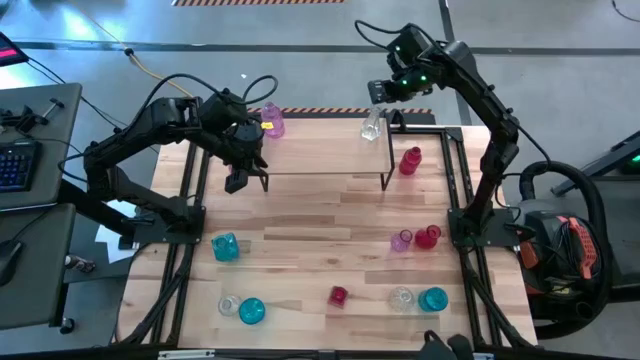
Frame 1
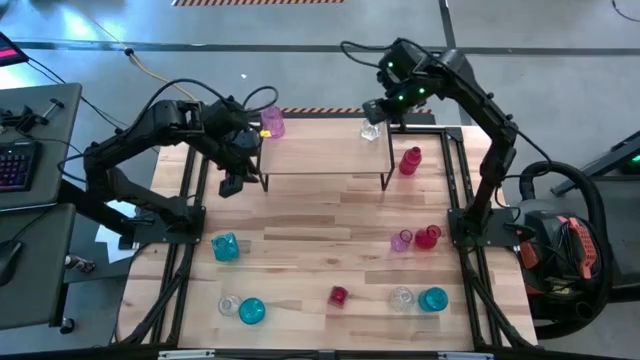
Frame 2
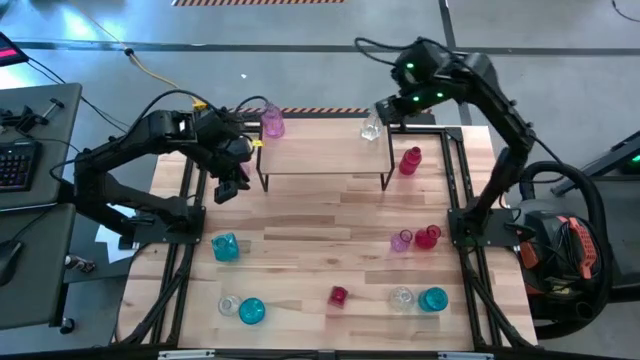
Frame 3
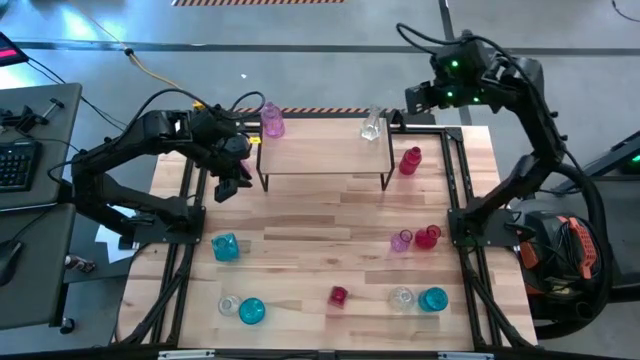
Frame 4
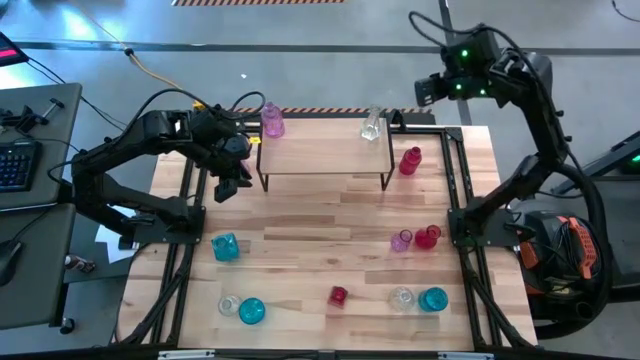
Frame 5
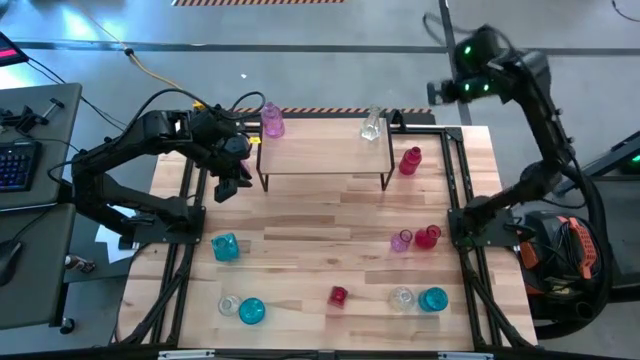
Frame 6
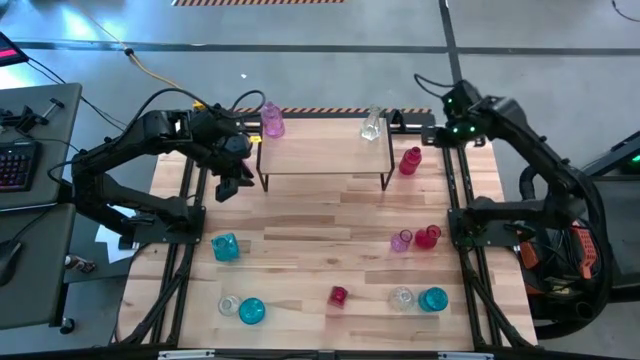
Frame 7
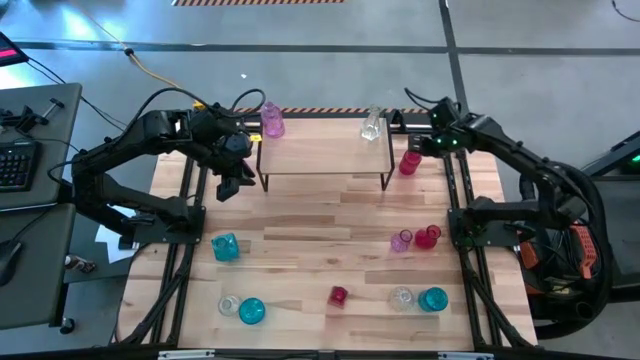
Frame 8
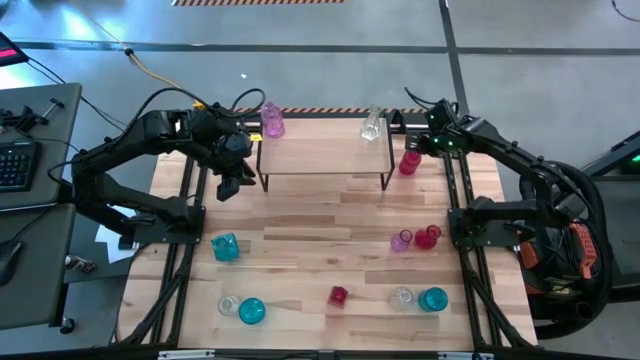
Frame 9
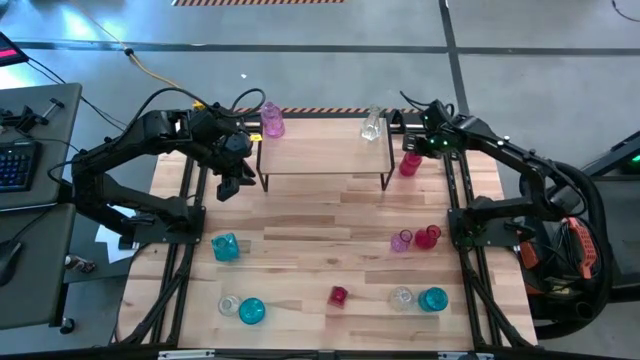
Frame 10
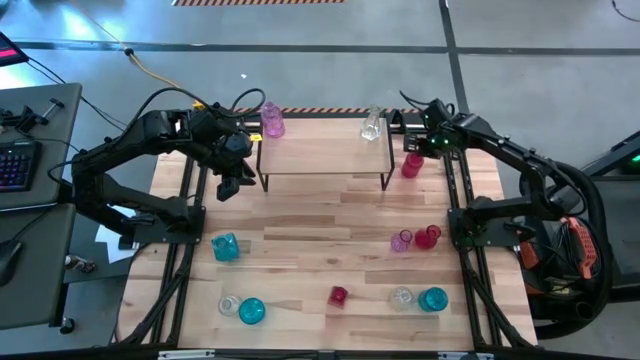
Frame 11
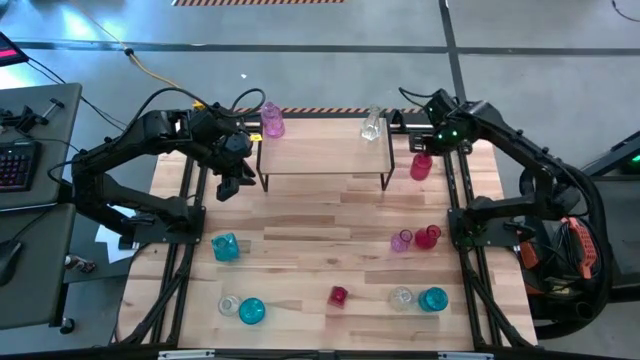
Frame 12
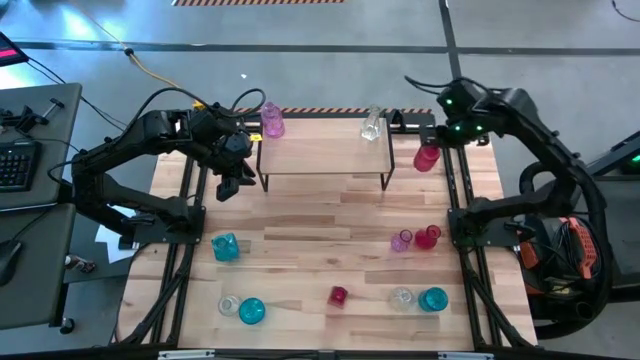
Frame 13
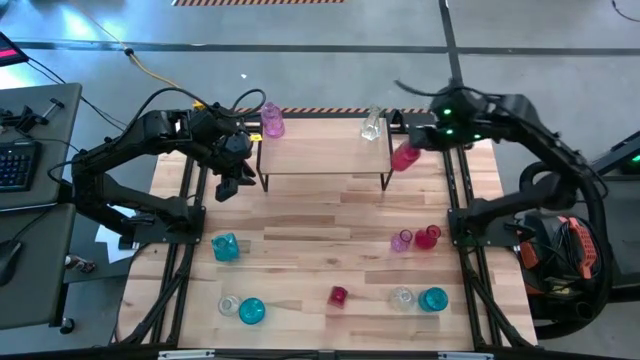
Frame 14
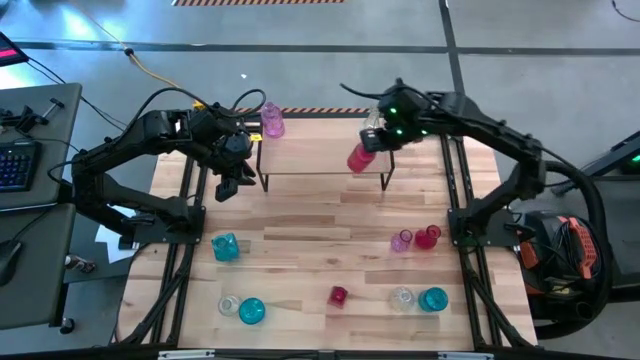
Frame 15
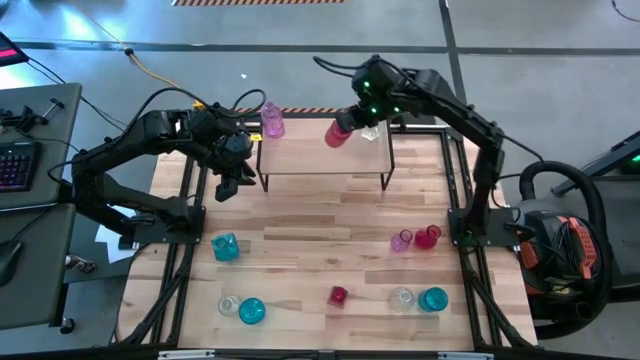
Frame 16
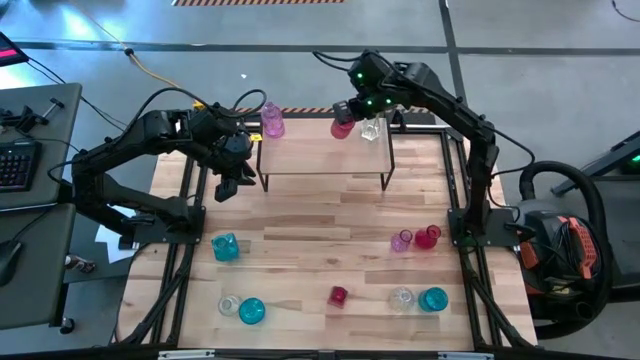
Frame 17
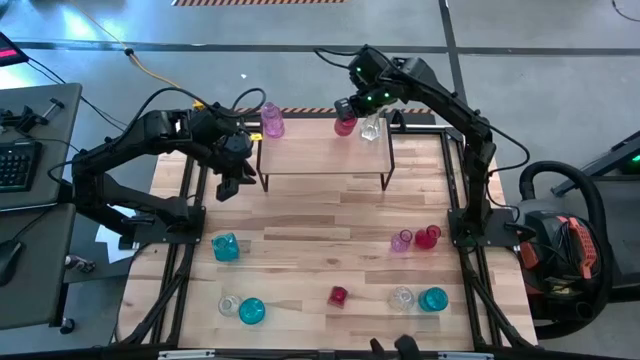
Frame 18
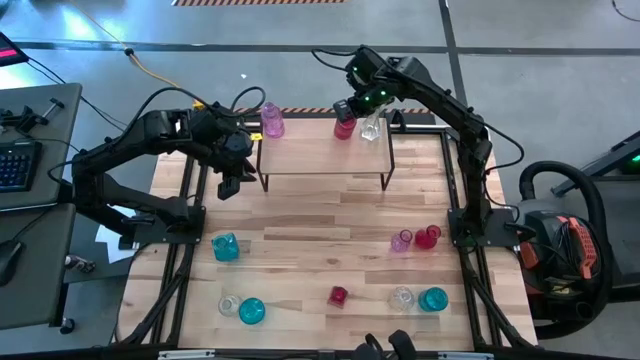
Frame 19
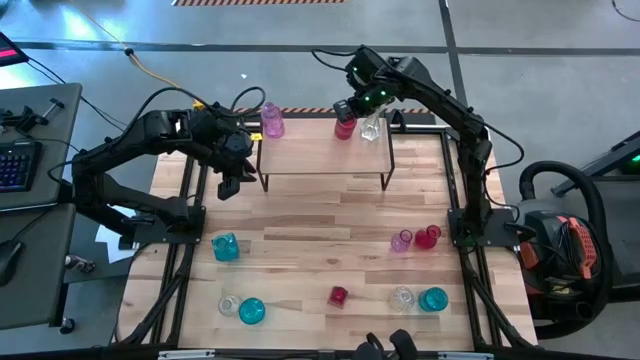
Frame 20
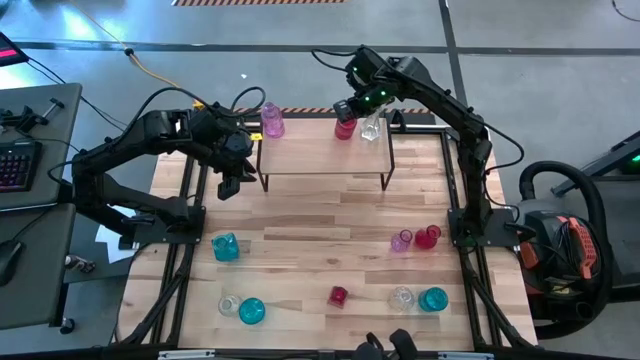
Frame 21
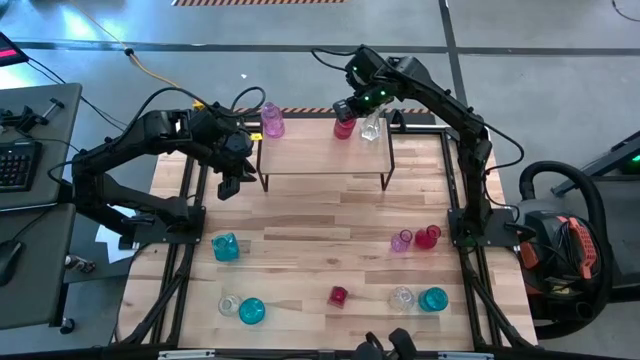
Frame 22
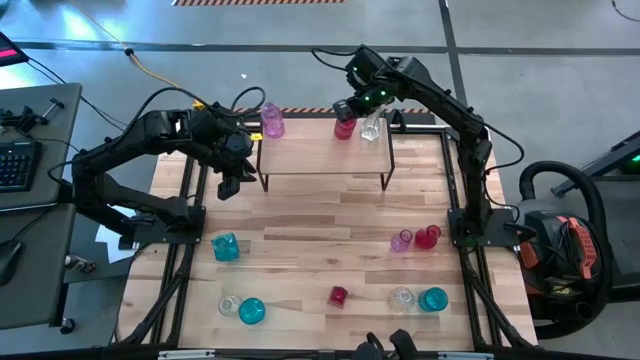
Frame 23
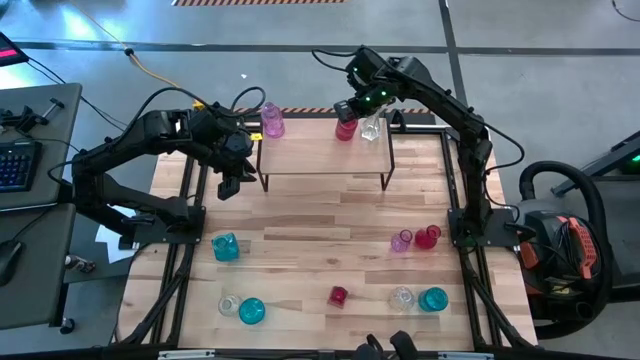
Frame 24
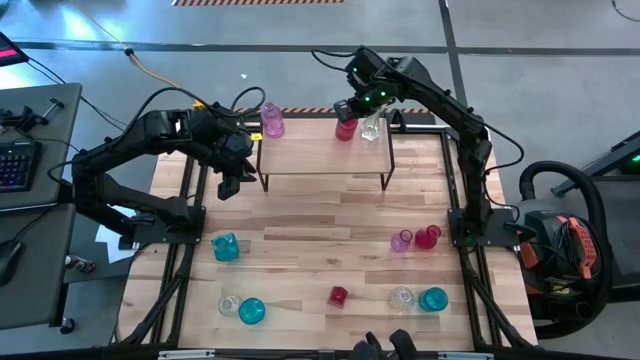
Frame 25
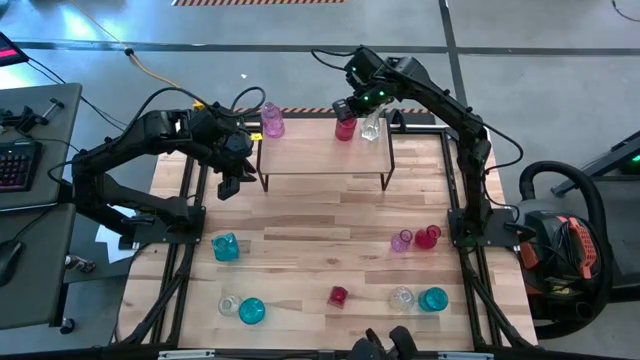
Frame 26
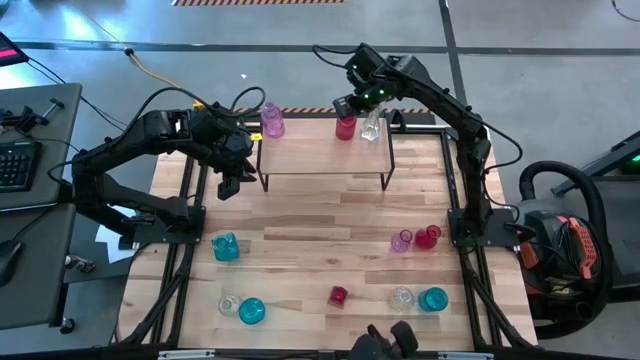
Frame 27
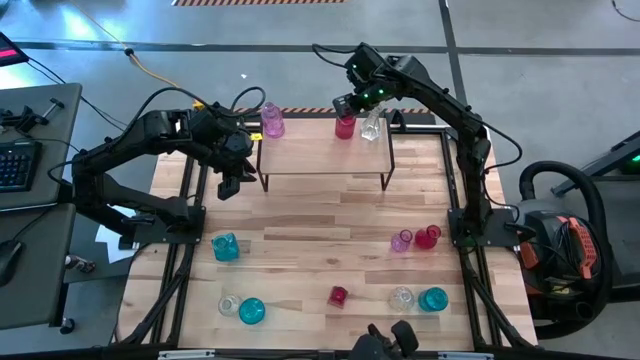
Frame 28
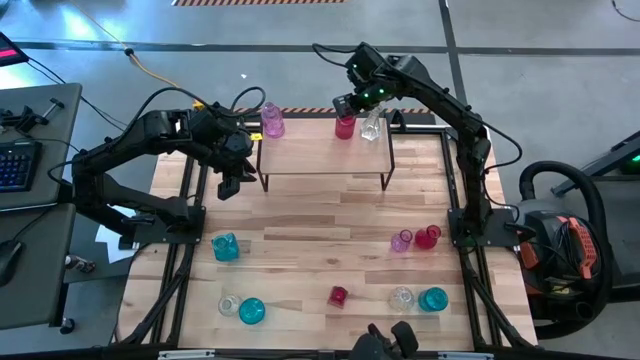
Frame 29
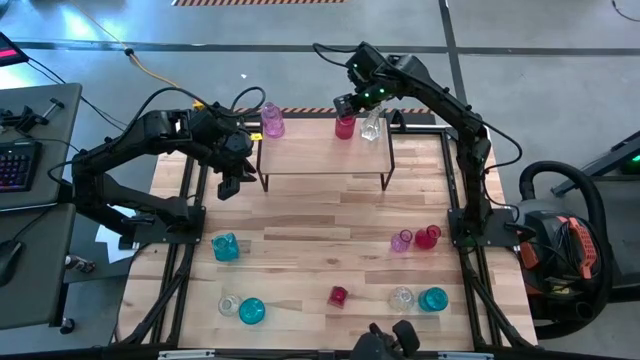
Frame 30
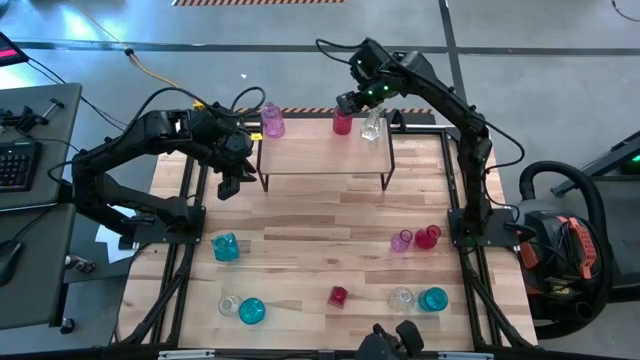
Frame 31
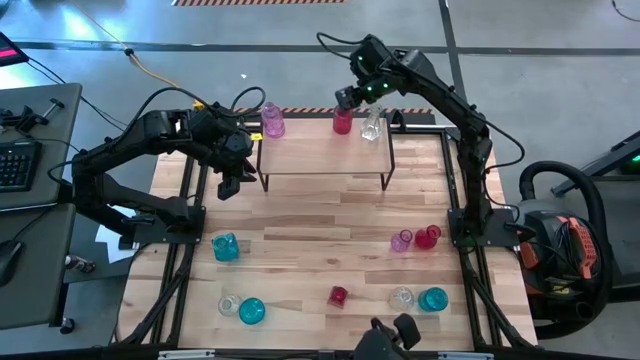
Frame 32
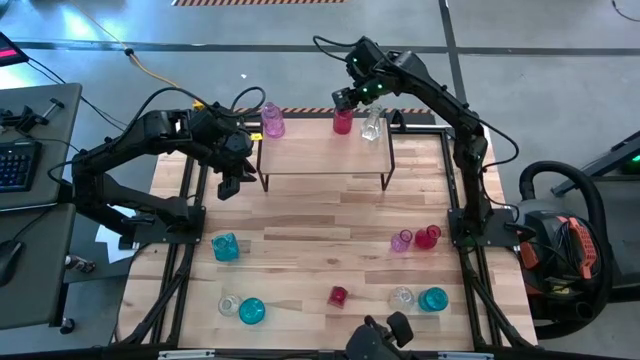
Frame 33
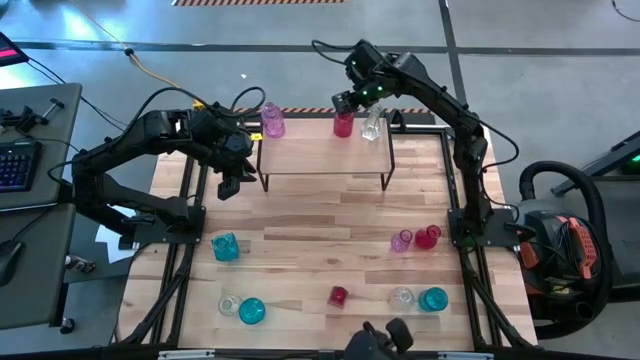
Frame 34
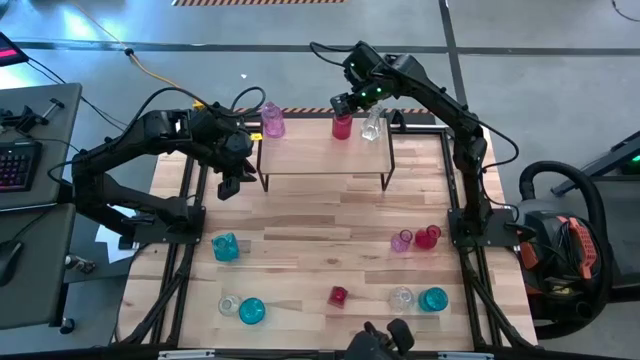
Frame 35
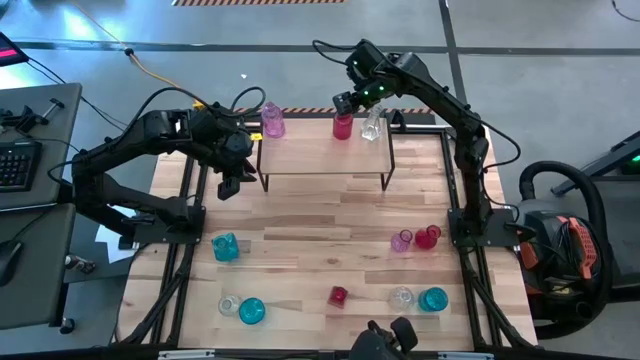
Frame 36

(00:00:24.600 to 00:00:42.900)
Task: sort vases onto shelf
Put the top right red vase on the shelf
